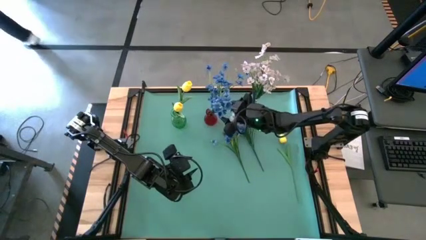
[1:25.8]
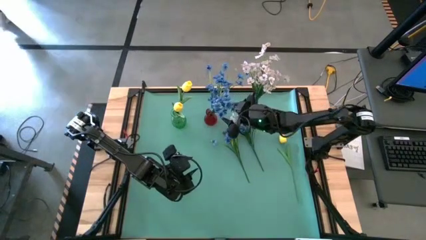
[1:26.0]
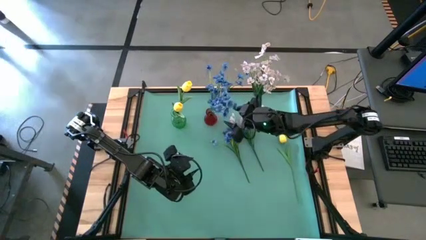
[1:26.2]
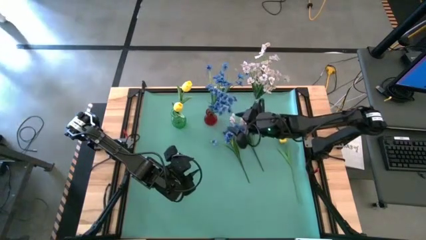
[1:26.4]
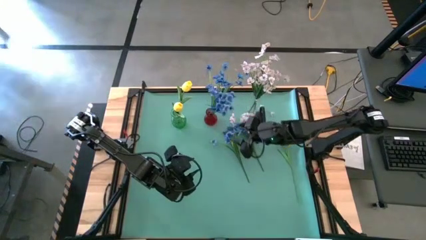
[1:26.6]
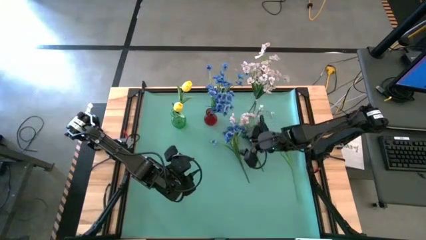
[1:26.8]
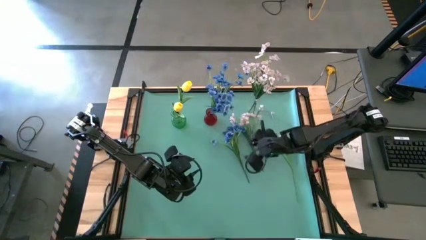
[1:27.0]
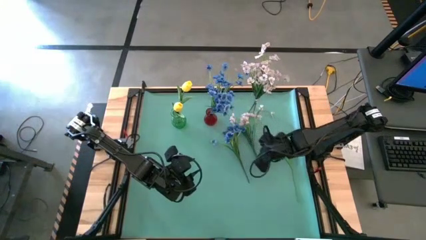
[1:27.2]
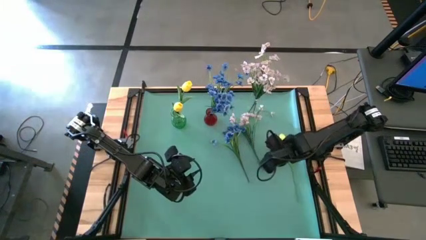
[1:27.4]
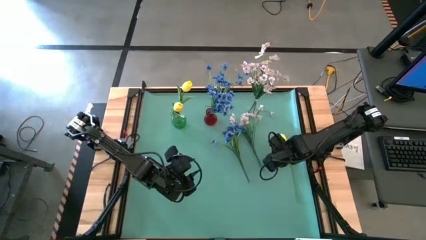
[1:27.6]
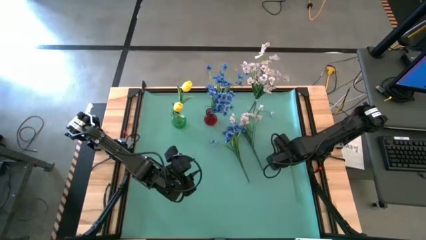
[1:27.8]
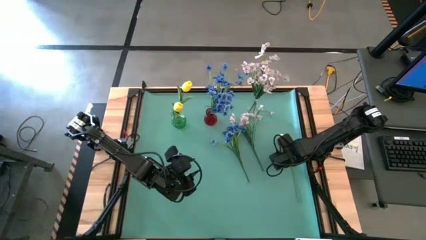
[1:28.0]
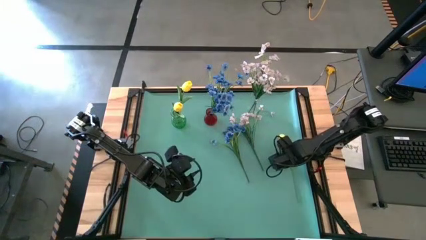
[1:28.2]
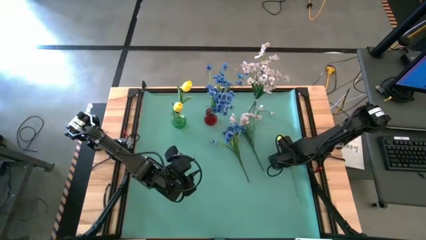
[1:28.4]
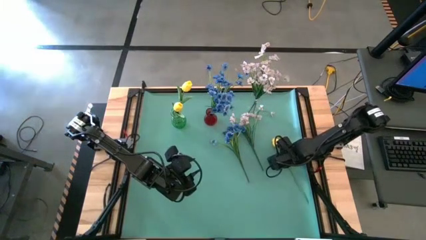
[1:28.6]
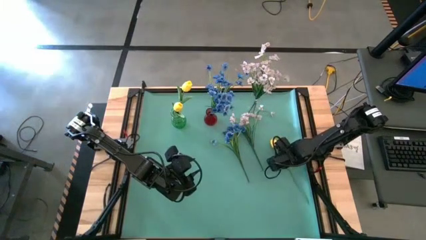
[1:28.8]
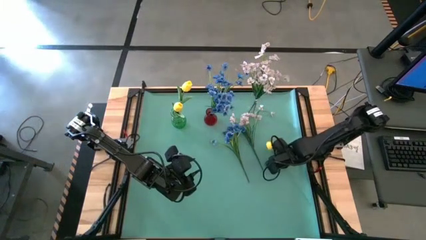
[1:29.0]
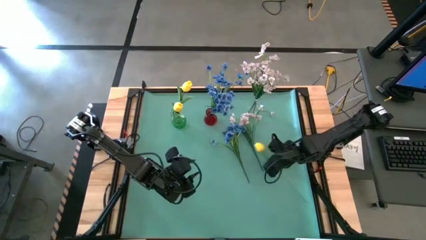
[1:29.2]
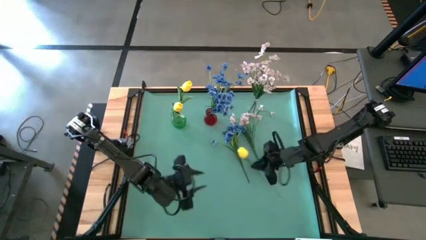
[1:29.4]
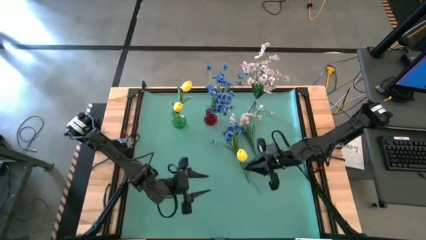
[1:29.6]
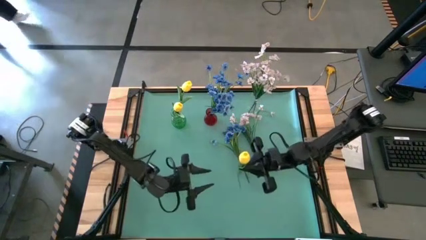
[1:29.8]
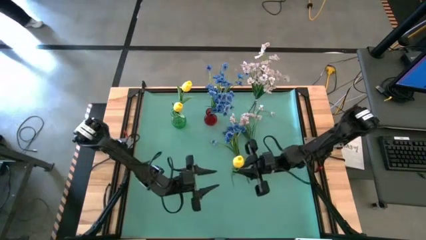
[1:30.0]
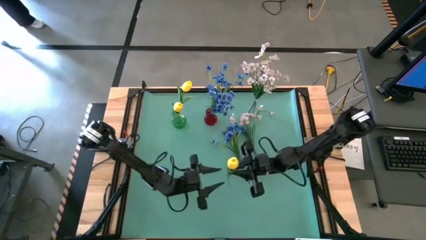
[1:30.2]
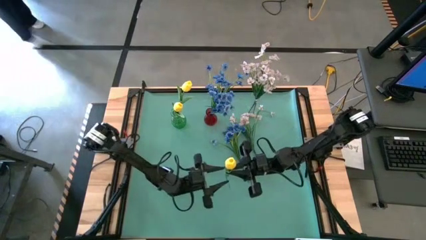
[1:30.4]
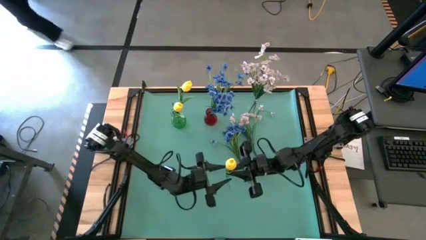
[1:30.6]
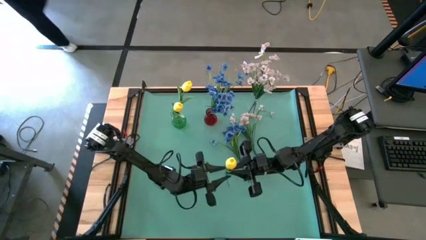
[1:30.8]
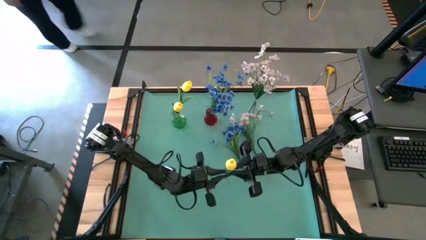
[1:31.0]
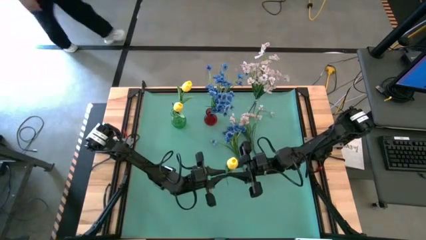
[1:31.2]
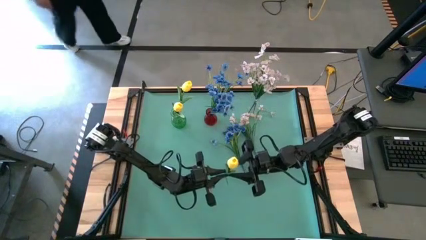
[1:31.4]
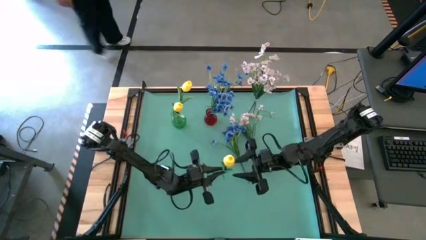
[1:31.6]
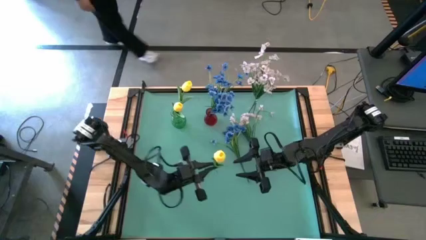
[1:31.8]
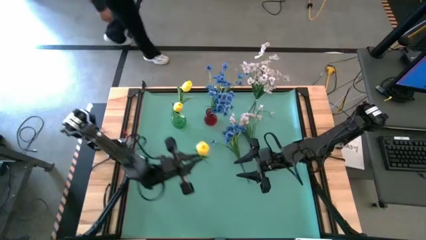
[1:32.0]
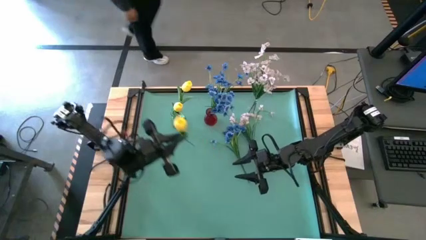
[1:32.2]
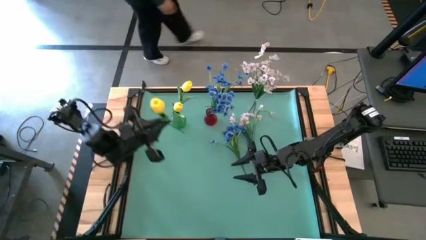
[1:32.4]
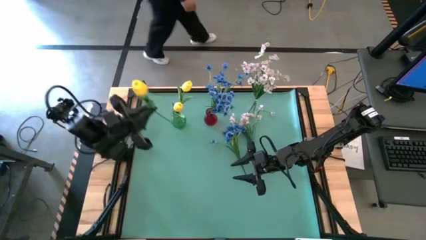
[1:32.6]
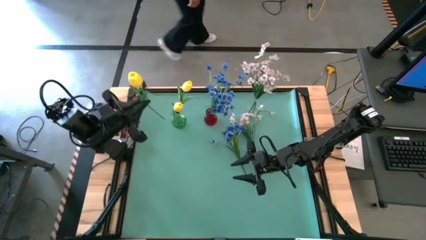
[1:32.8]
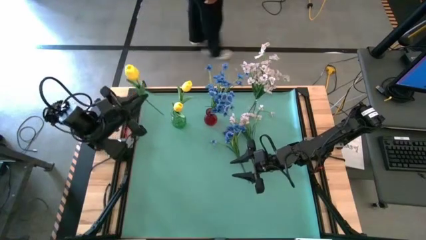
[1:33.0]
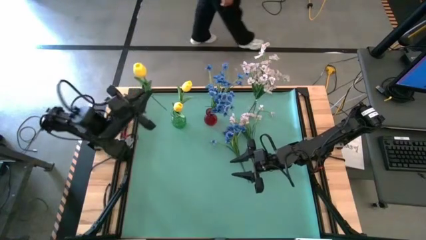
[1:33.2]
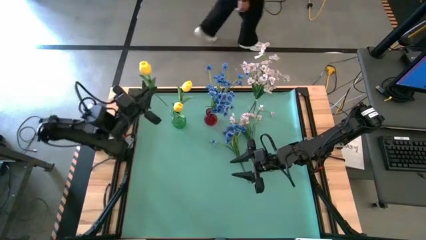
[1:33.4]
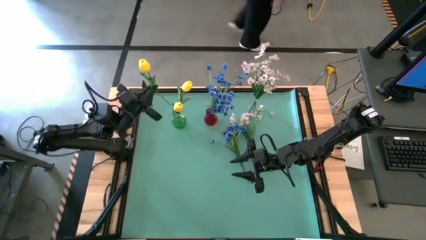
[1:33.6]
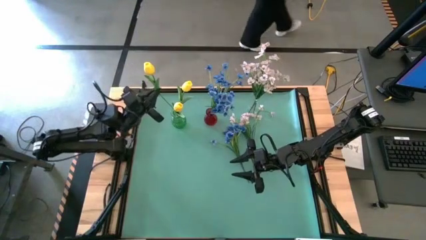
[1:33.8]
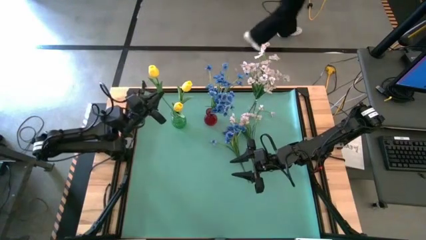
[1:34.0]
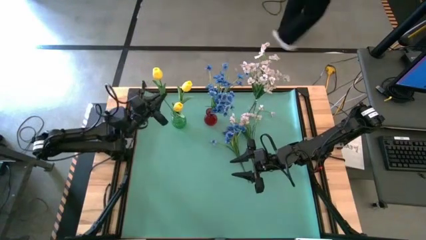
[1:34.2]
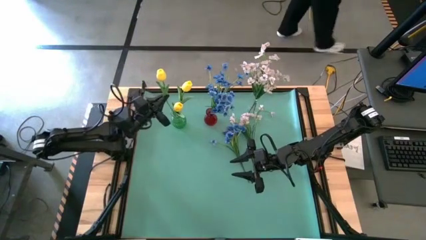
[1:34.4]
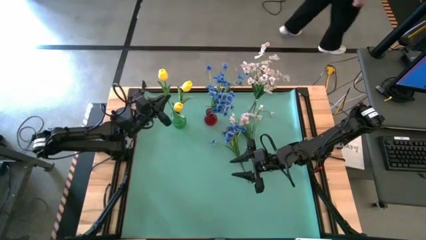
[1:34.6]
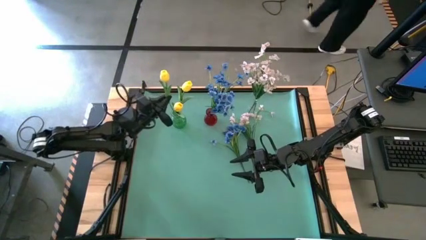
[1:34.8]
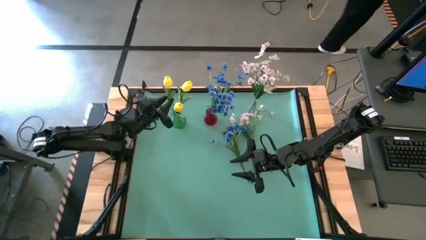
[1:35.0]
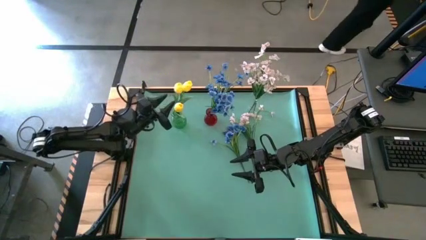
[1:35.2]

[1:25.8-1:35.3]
Task: Sort flowers into vase by color
Put the yellow flower into the green vase

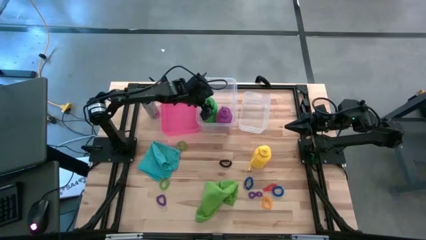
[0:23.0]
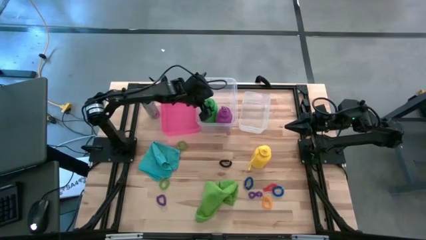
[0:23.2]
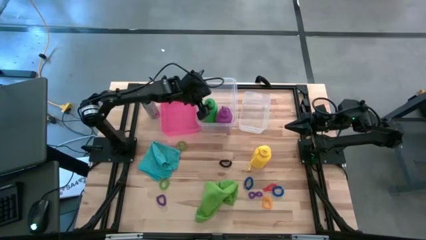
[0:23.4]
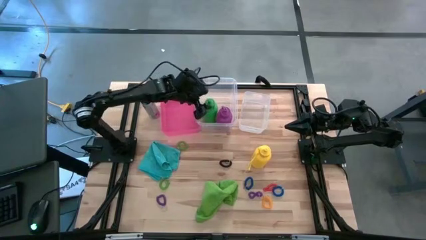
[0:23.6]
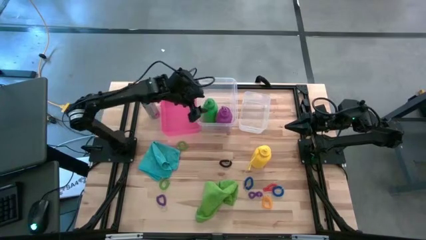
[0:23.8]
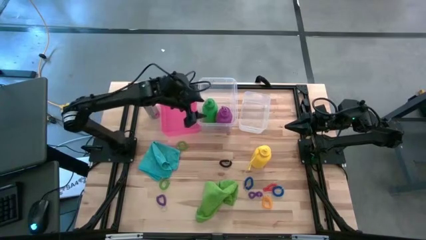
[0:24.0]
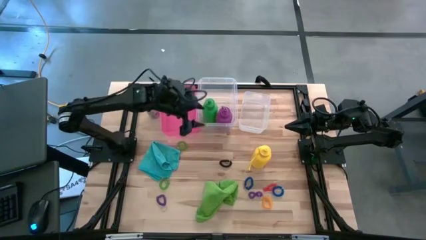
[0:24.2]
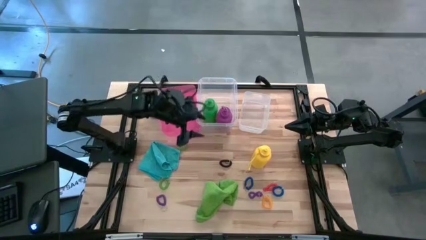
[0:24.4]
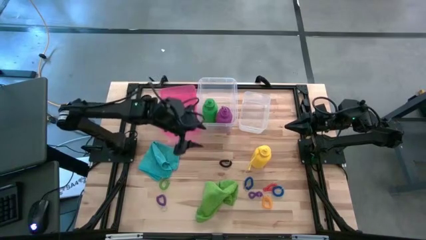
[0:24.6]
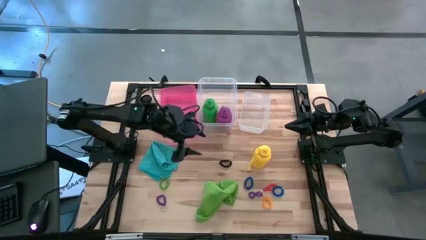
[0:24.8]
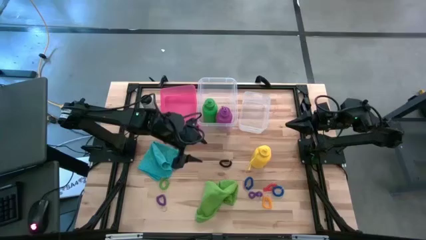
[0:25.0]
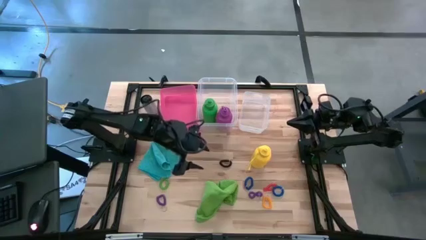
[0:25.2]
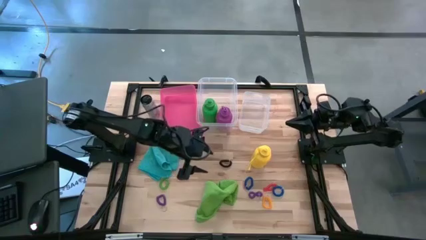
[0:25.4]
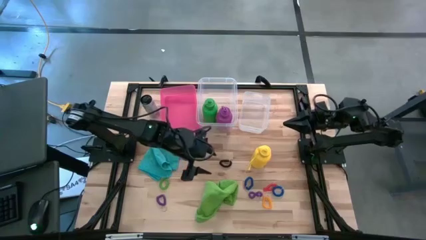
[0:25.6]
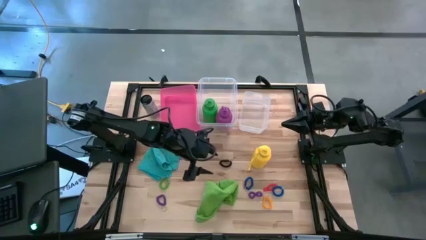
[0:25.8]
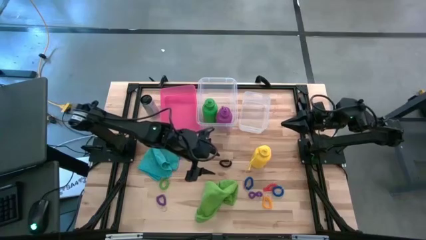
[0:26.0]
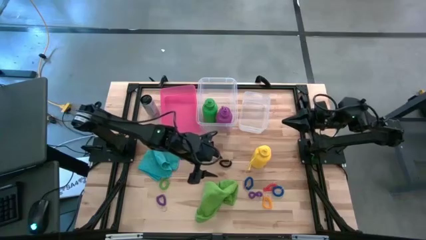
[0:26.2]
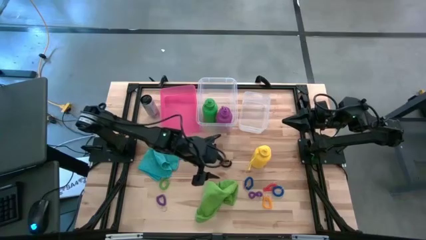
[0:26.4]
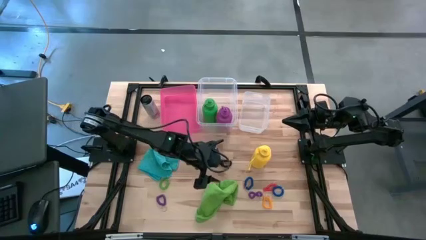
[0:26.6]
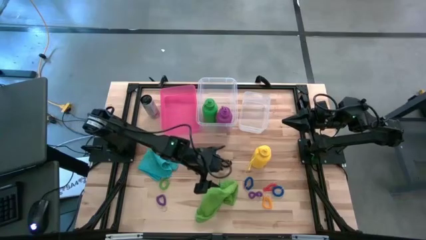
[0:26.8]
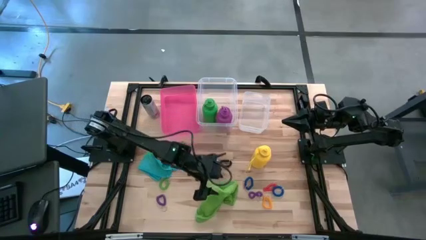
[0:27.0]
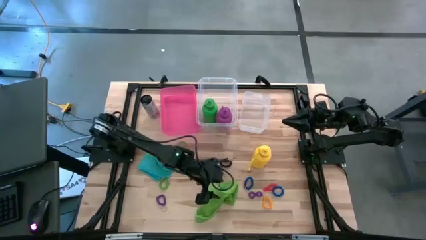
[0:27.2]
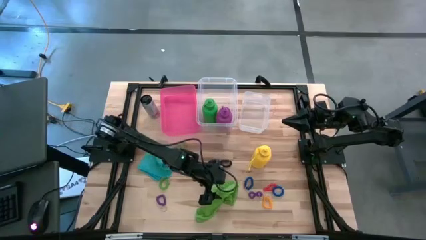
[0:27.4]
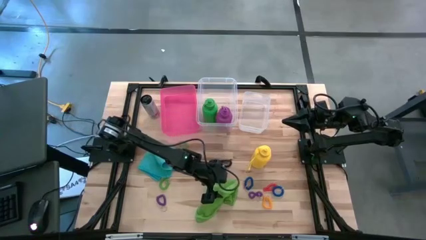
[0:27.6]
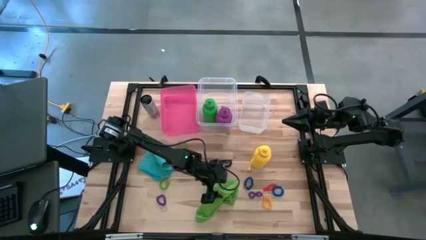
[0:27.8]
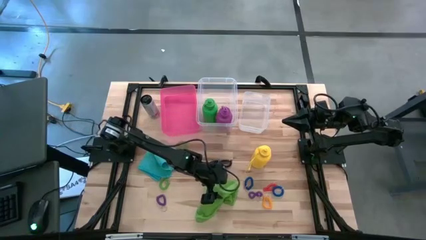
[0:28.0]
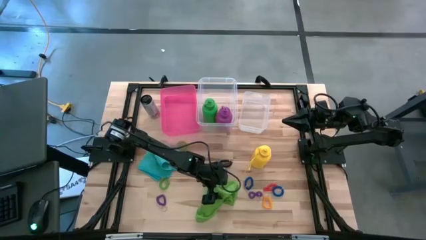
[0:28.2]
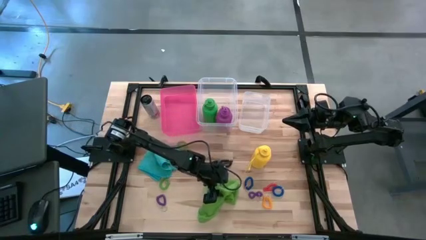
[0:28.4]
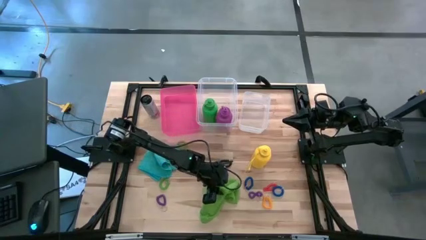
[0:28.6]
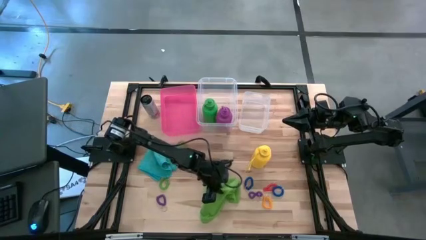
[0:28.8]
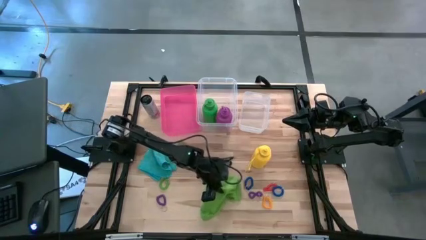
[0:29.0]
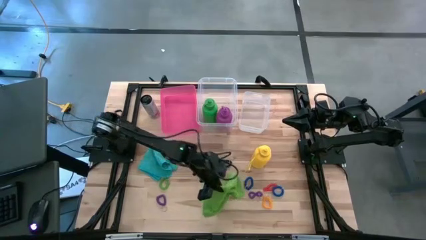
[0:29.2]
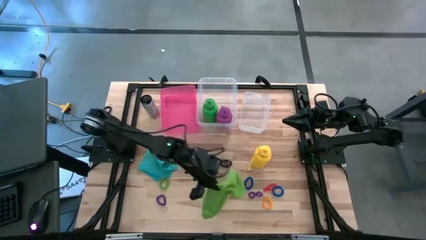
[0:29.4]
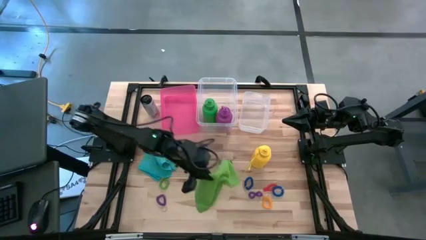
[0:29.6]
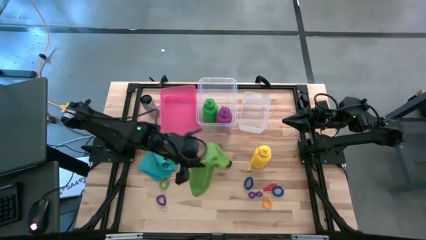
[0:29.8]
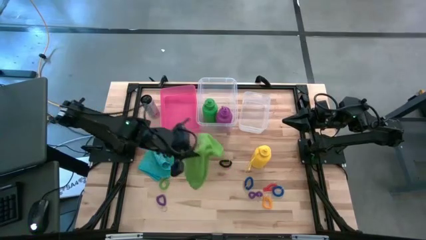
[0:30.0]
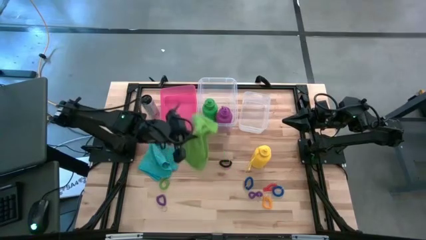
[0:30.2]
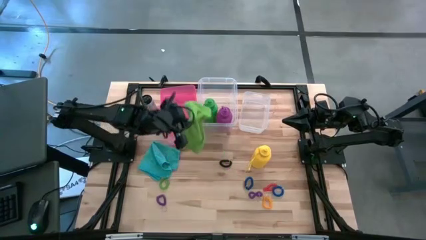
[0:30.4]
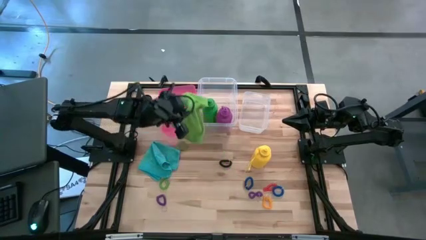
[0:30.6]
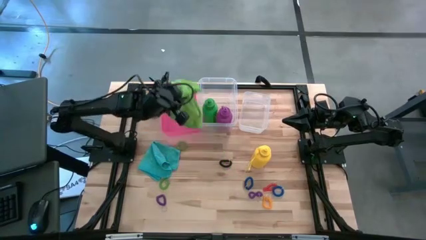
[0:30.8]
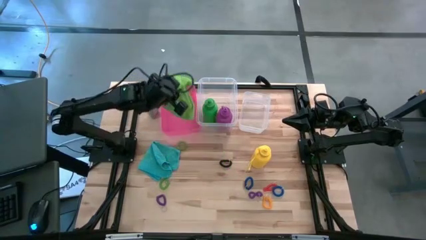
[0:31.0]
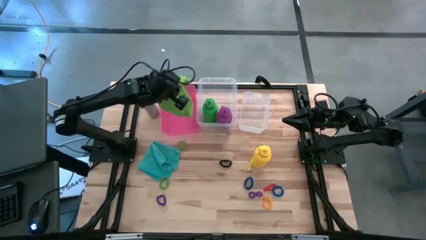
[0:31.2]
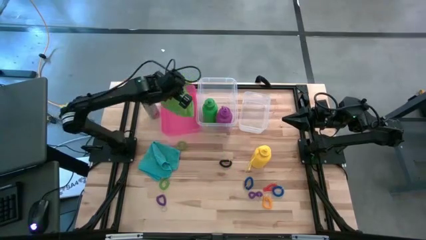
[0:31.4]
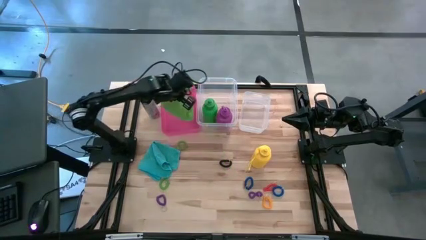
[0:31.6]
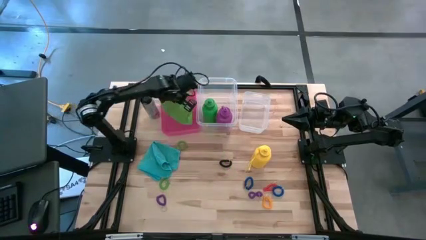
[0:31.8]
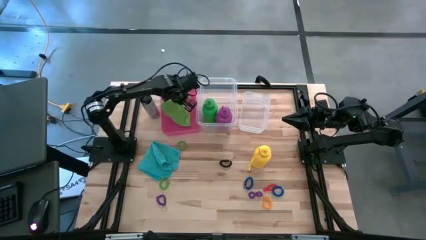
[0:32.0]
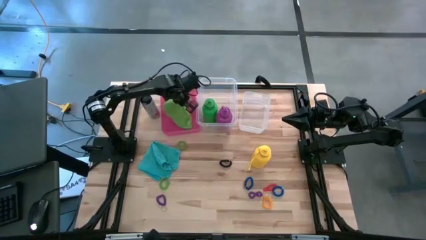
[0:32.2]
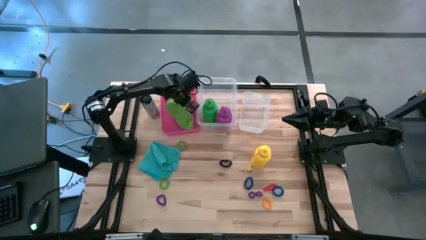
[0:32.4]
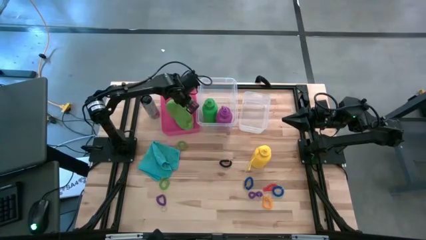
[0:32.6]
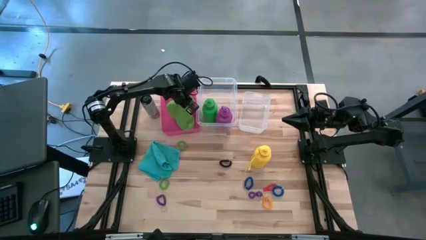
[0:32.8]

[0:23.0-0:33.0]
Task: Pick & Place Sports Items
Put the green towel into the red bin
